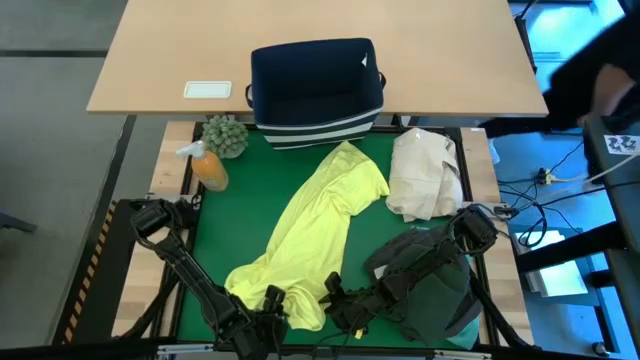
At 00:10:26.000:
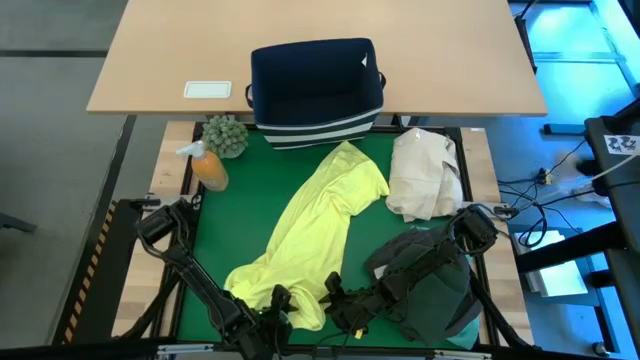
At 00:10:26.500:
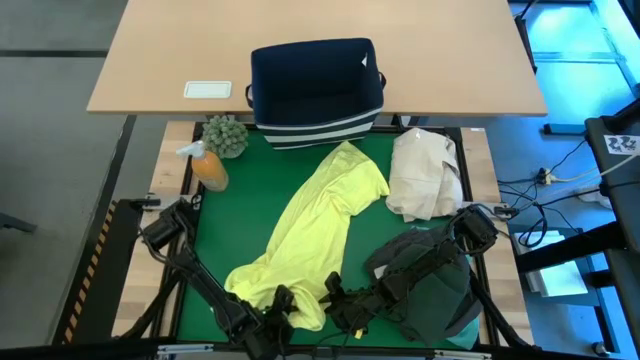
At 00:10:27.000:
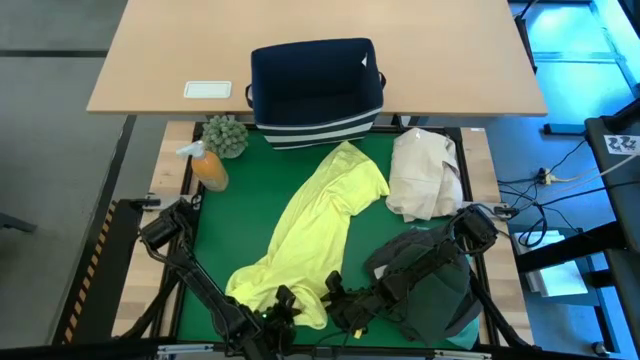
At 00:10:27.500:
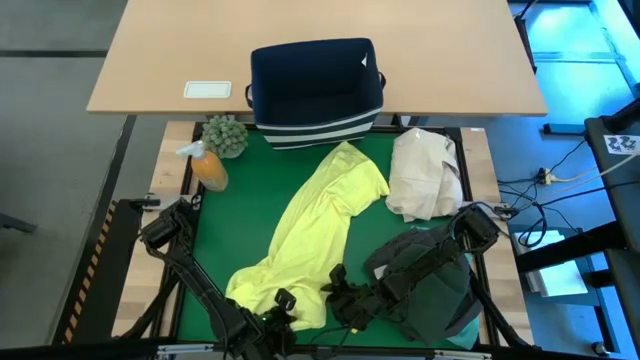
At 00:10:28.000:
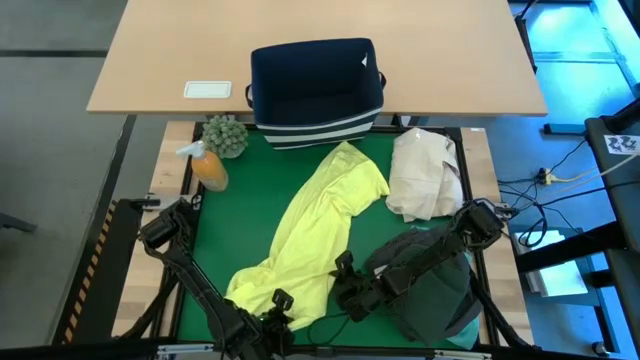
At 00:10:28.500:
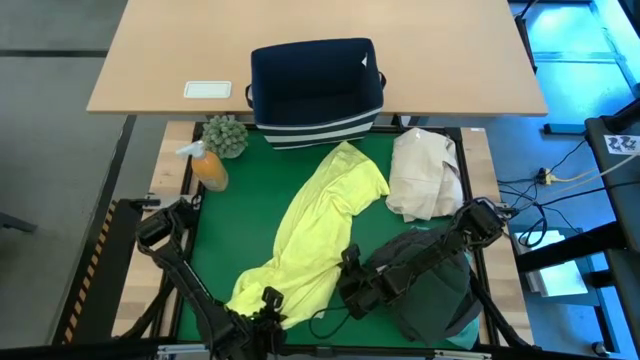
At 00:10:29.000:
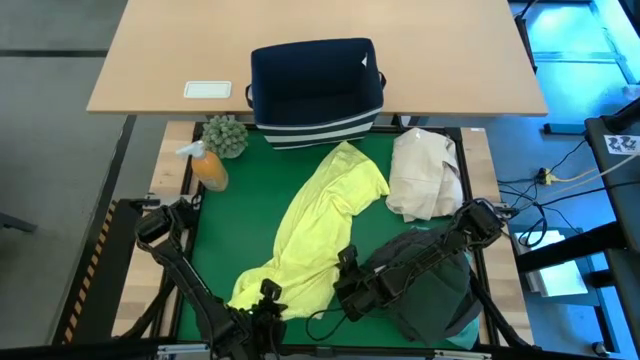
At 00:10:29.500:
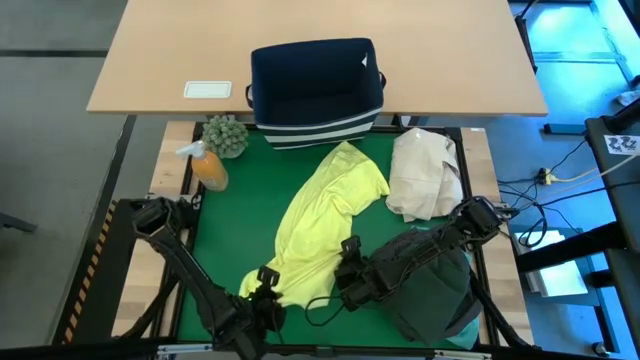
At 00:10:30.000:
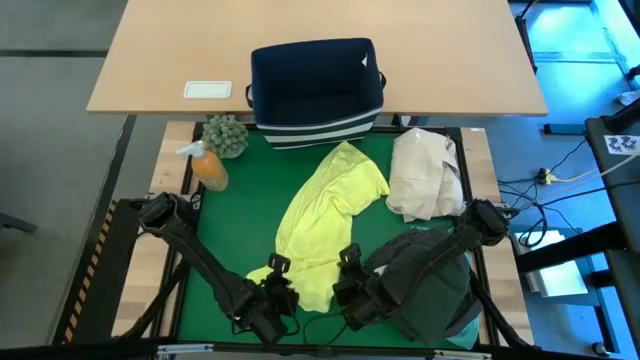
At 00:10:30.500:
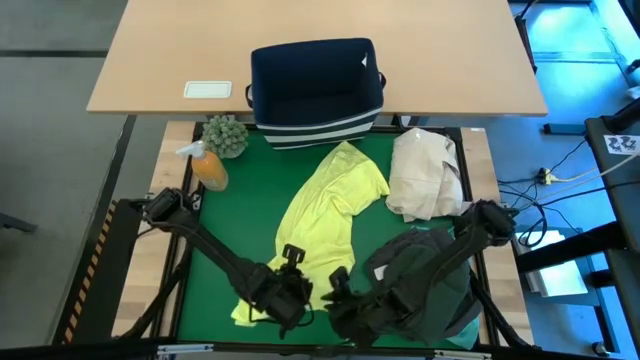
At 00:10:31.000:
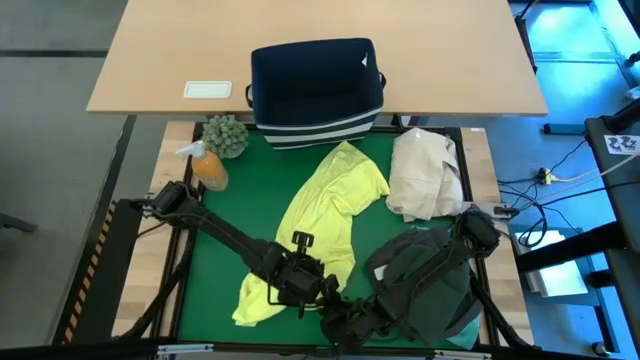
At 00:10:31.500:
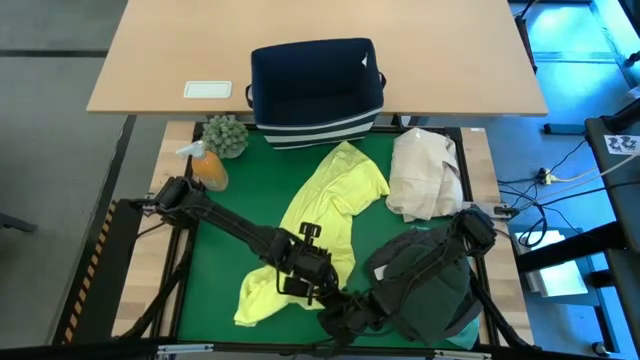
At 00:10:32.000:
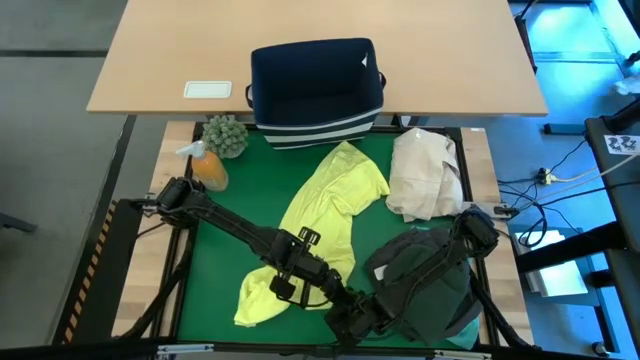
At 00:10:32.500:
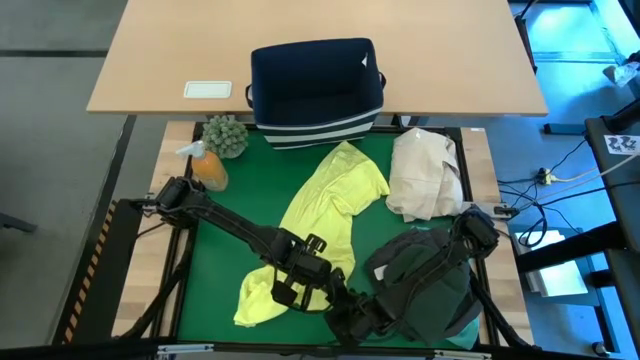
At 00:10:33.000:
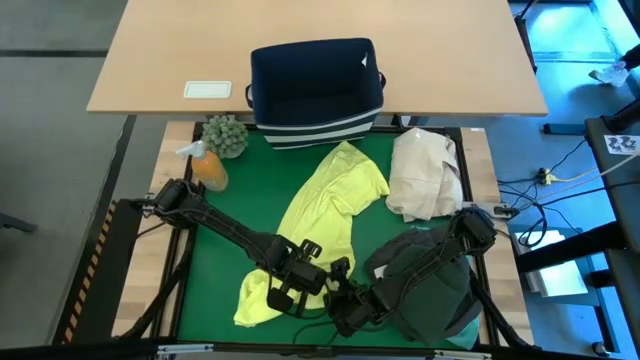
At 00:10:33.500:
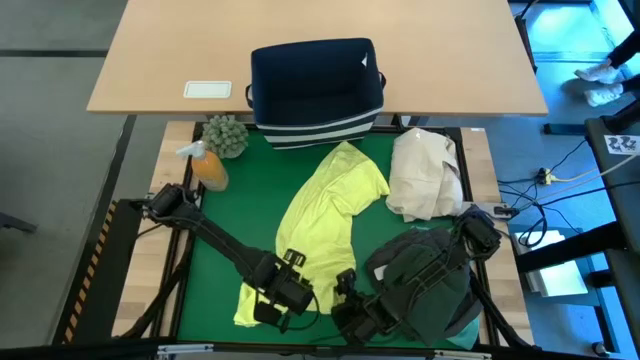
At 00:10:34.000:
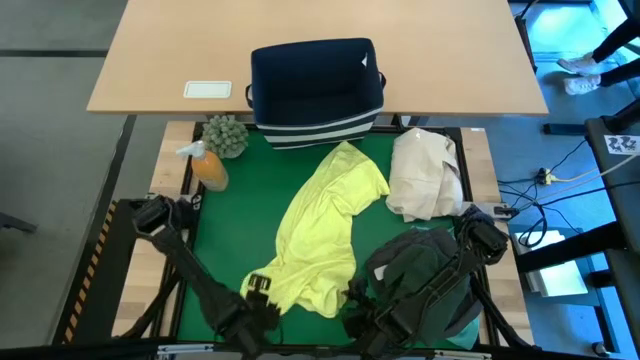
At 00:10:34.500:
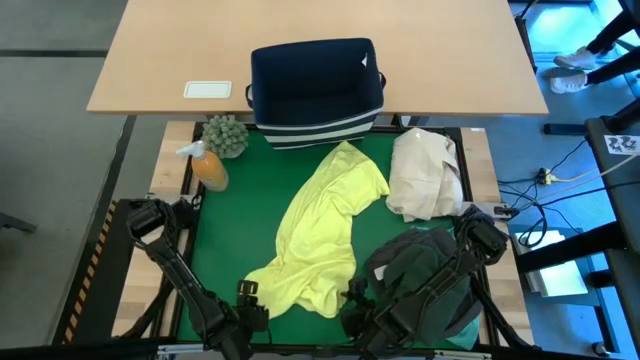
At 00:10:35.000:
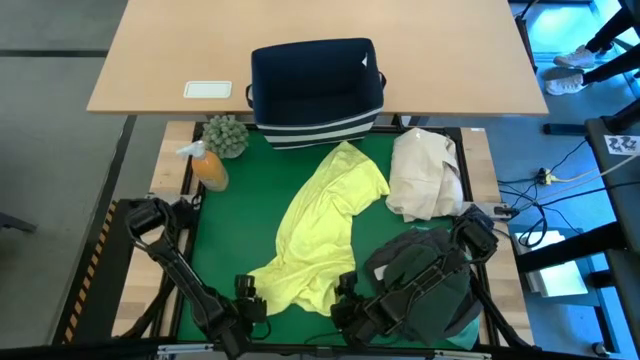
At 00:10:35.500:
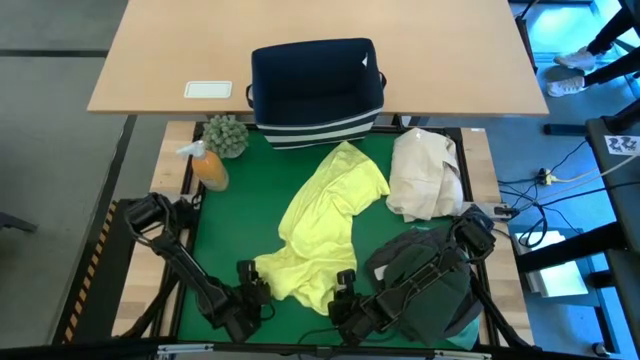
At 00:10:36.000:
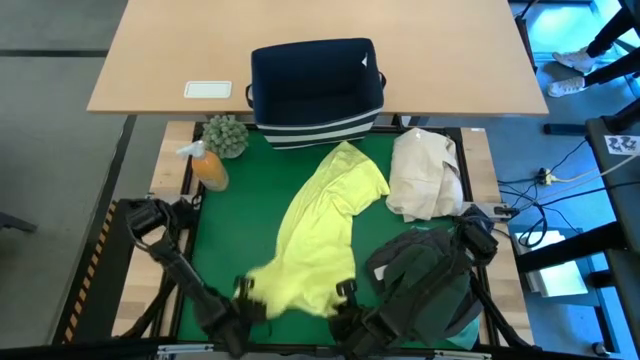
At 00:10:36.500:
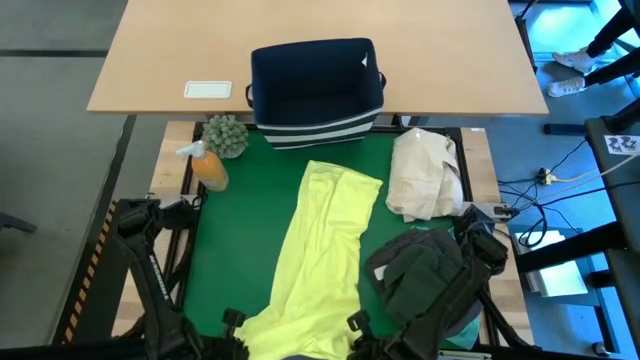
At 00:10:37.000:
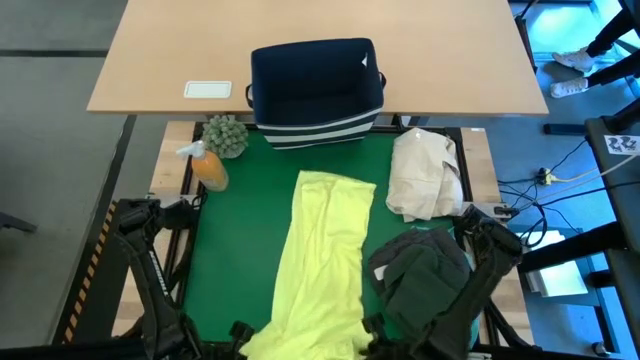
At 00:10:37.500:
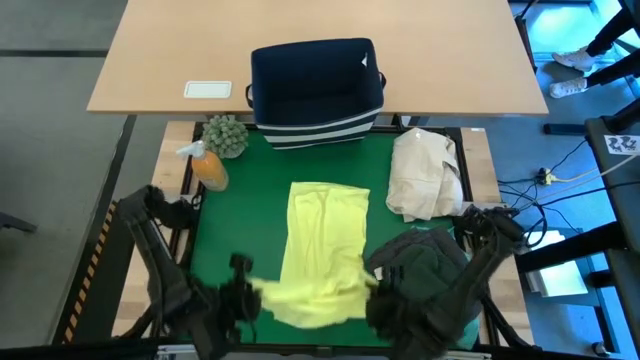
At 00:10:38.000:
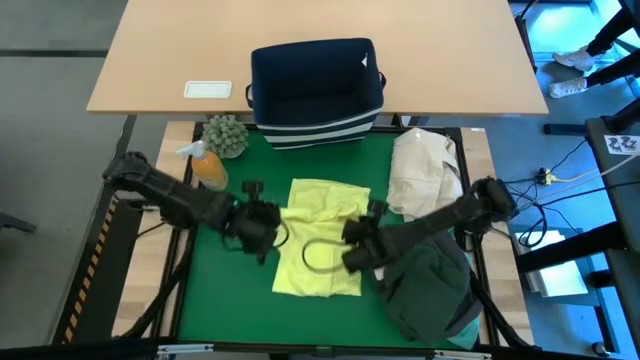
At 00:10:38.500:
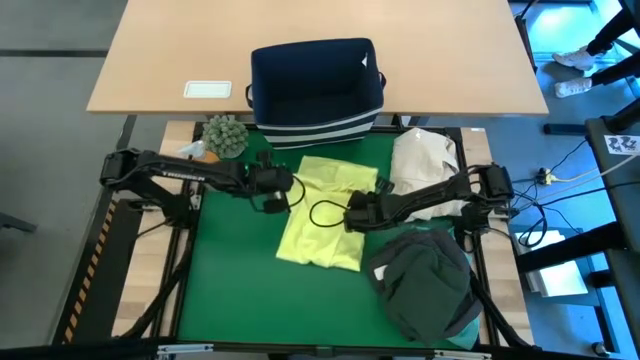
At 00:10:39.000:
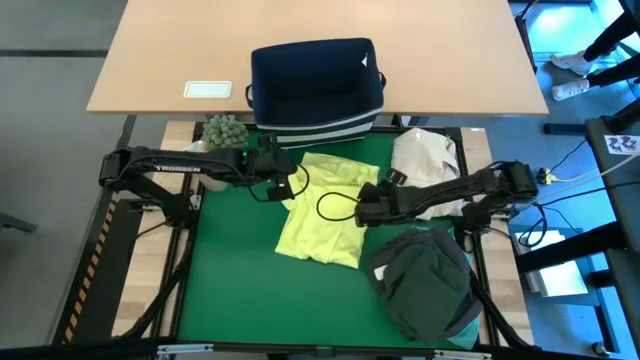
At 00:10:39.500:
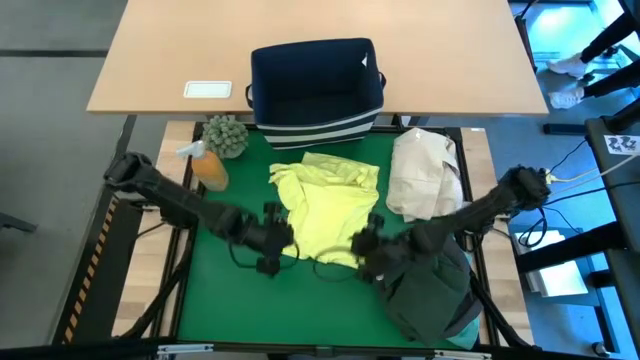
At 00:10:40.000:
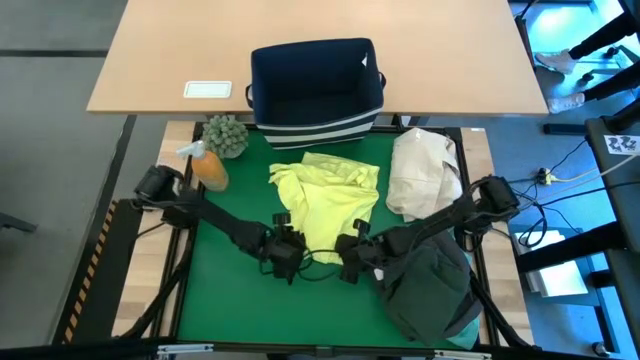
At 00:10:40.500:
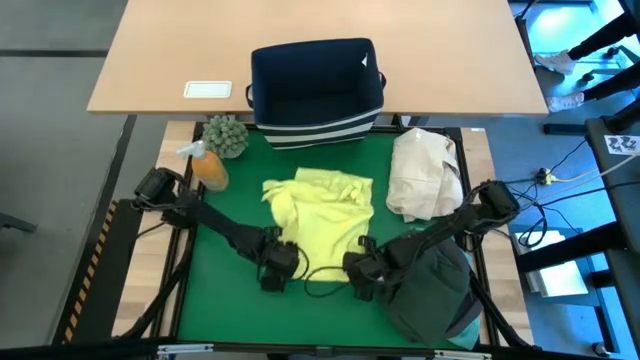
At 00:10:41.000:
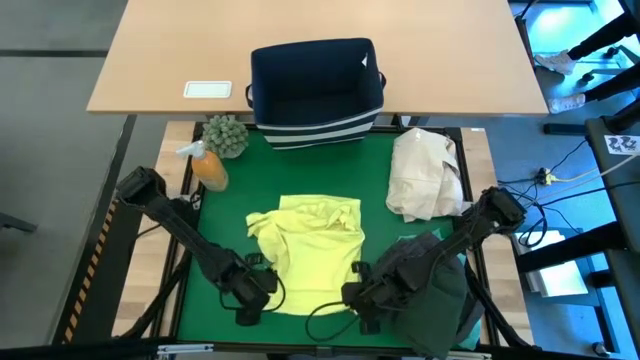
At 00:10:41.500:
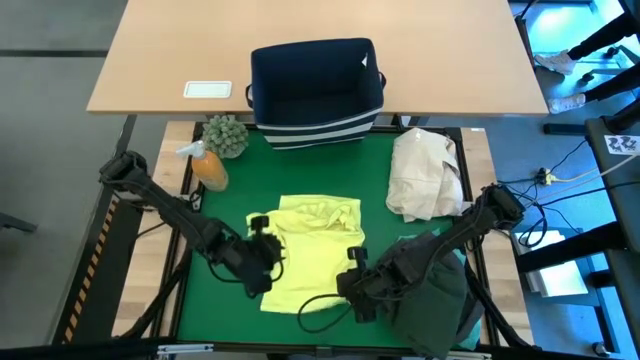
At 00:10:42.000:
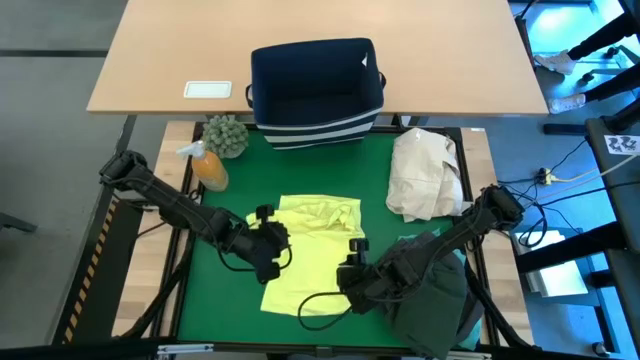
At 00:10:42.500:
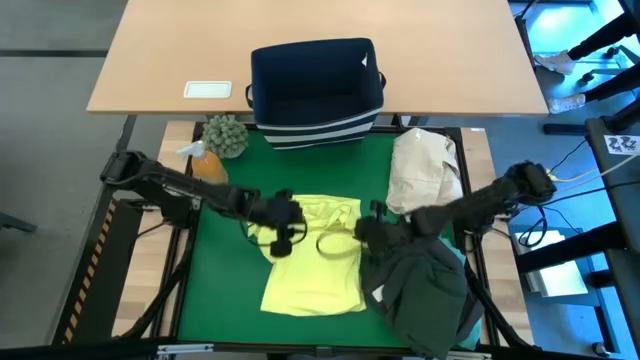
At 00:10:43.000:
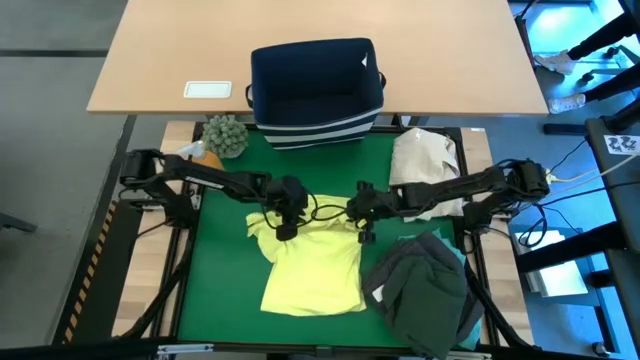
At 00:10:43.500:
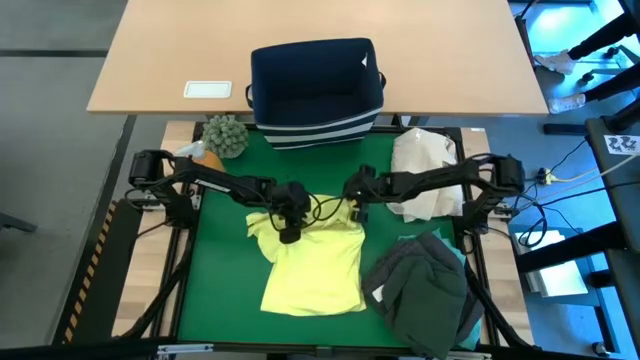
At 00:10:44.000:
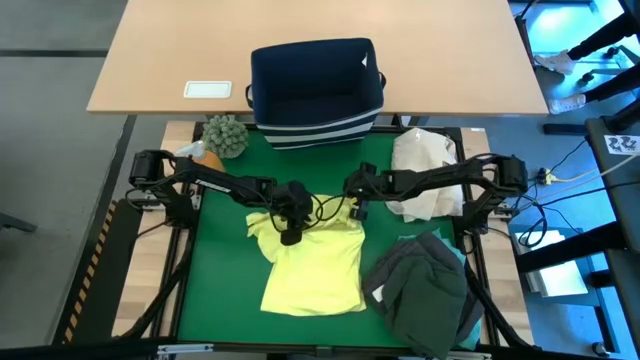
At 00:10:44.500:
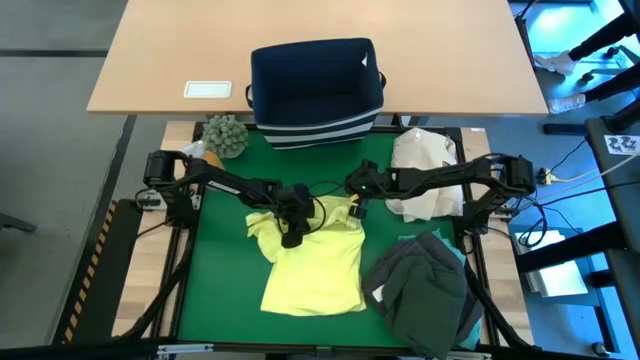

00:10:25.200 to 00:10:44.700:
Task: Fold laundry
Fold the yellow shirt on the table
